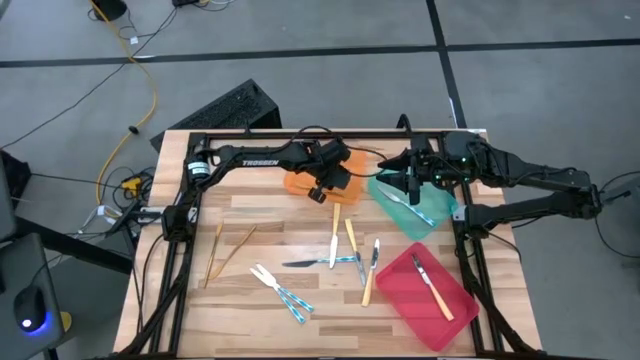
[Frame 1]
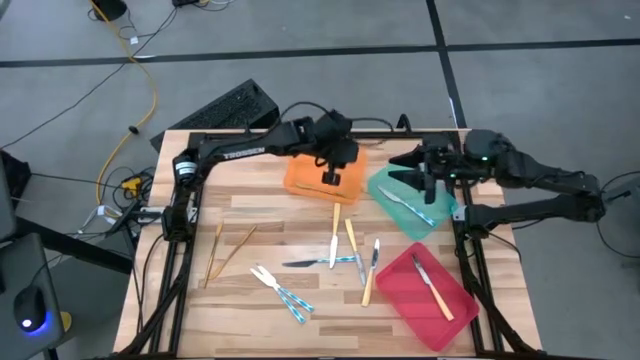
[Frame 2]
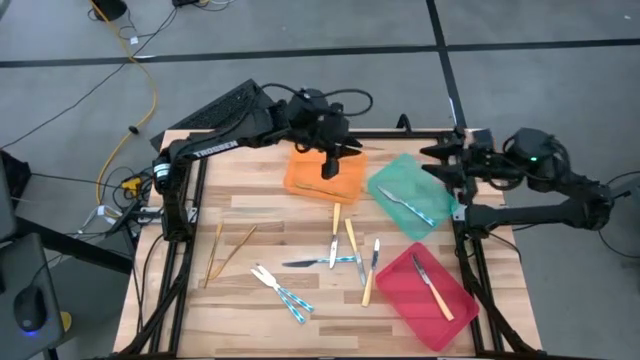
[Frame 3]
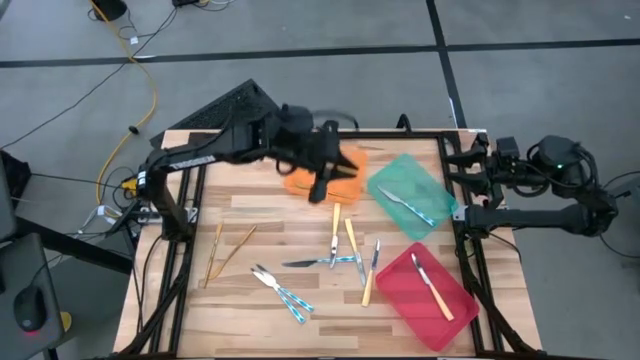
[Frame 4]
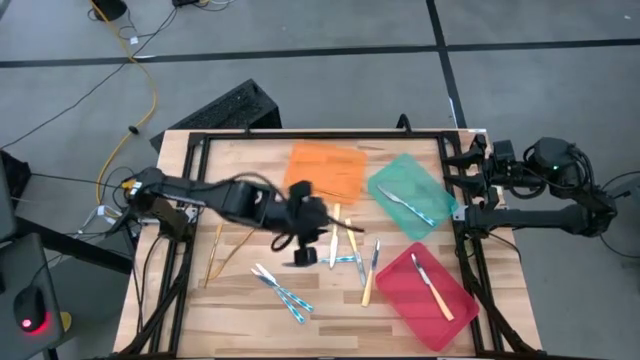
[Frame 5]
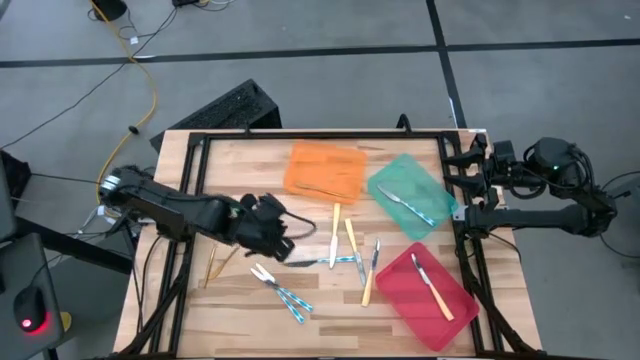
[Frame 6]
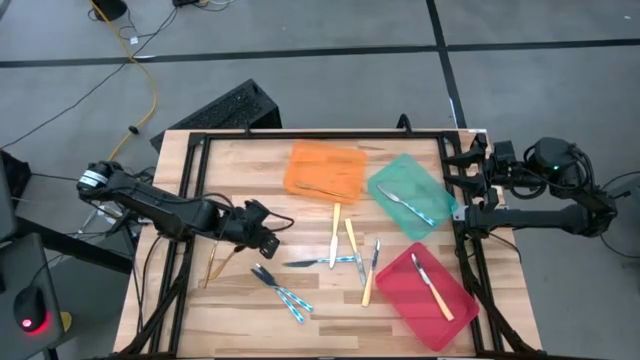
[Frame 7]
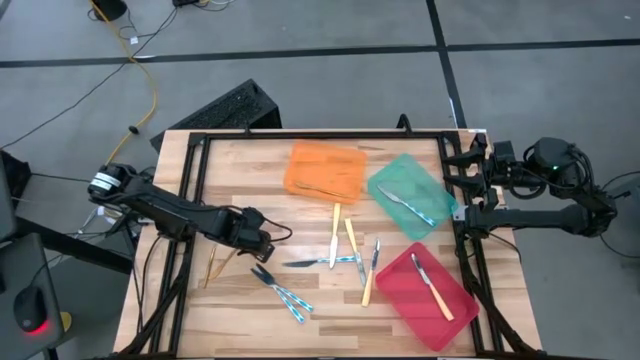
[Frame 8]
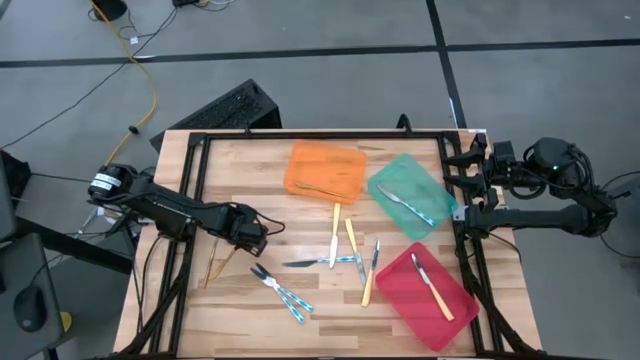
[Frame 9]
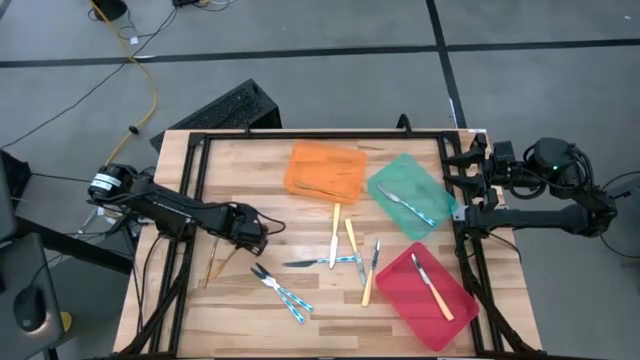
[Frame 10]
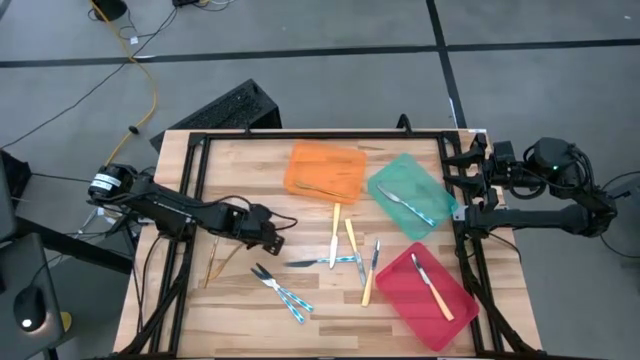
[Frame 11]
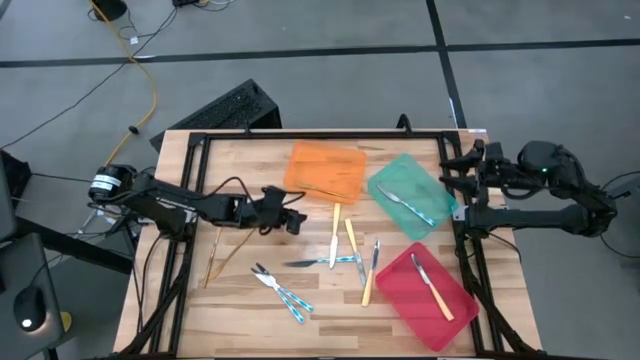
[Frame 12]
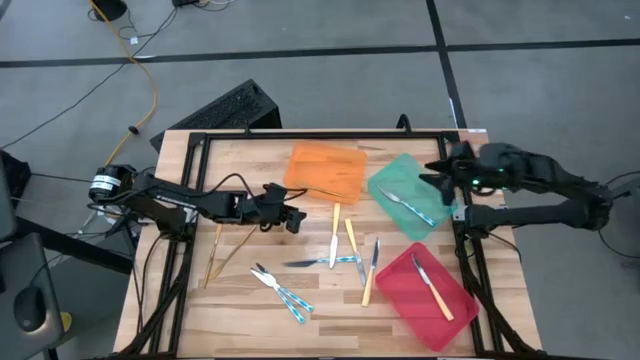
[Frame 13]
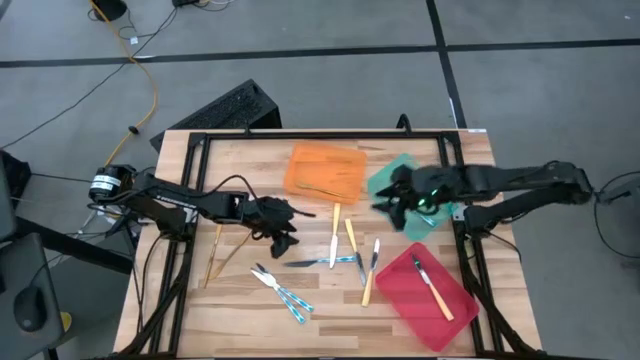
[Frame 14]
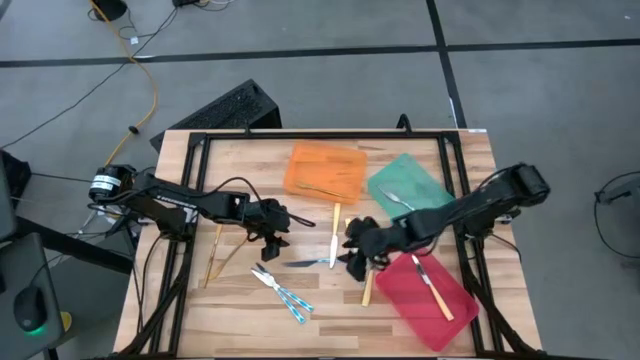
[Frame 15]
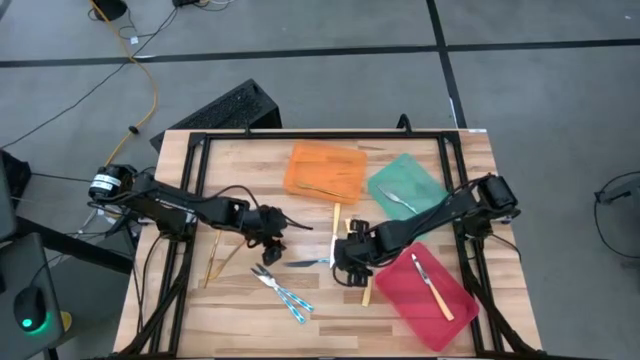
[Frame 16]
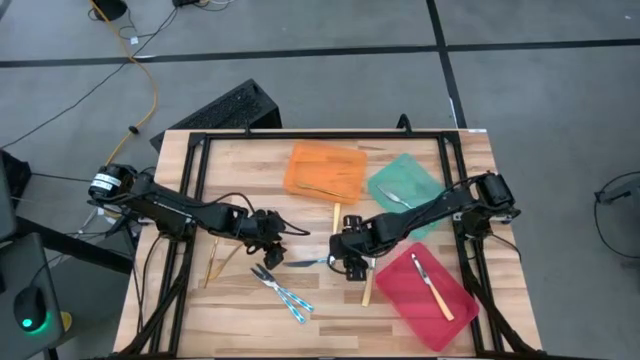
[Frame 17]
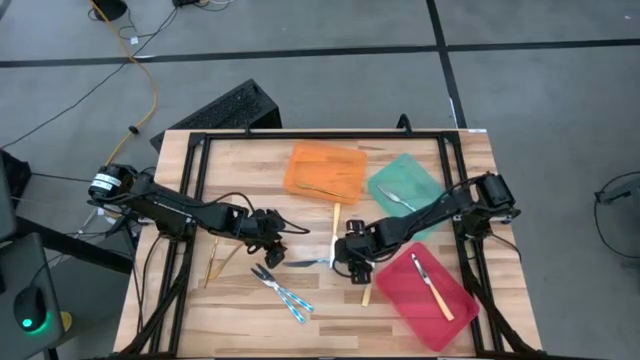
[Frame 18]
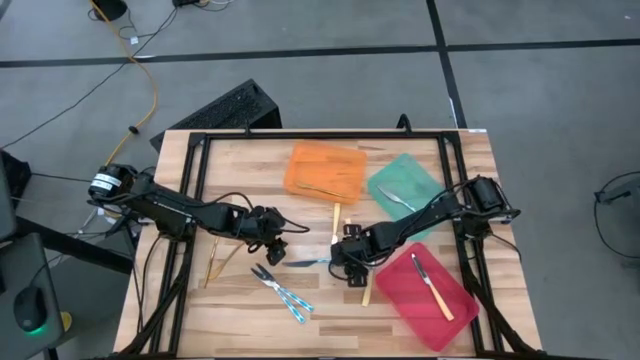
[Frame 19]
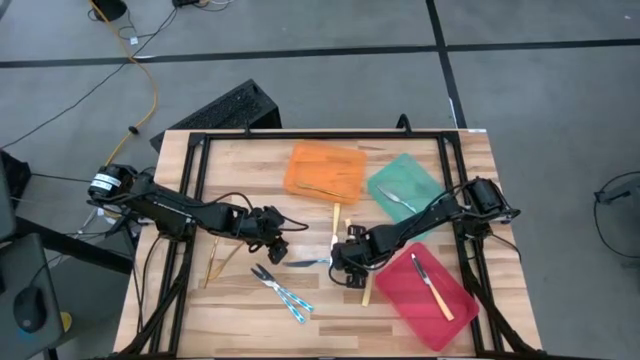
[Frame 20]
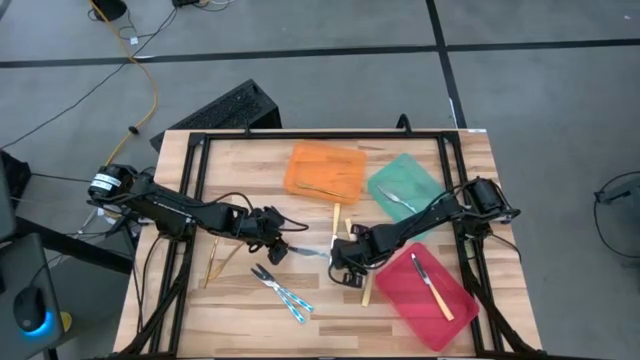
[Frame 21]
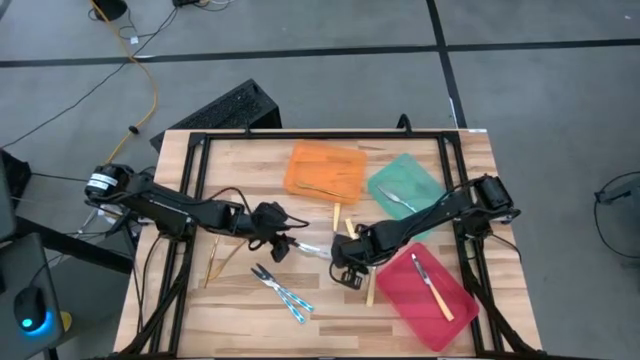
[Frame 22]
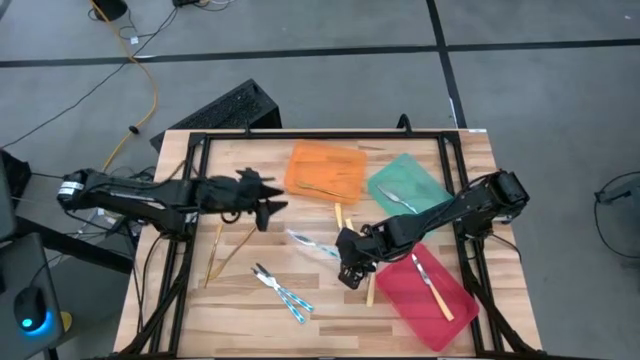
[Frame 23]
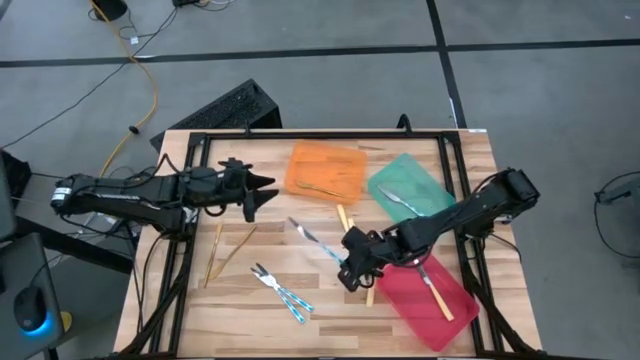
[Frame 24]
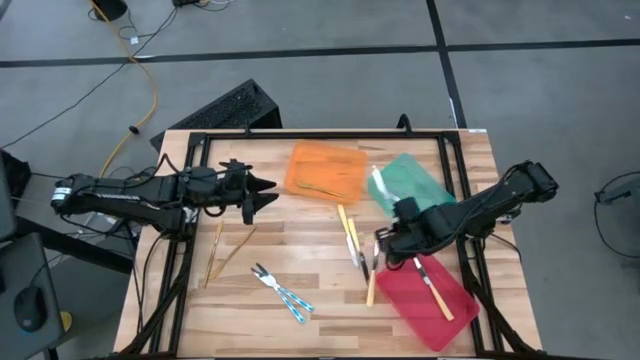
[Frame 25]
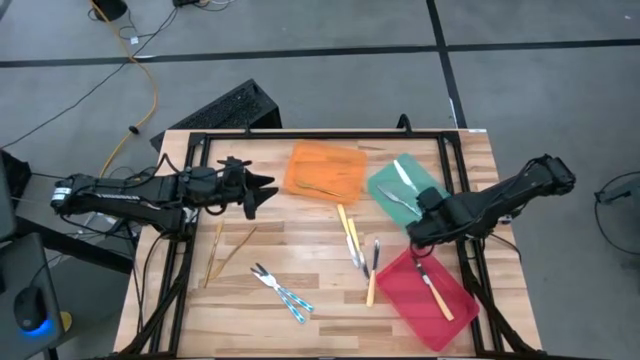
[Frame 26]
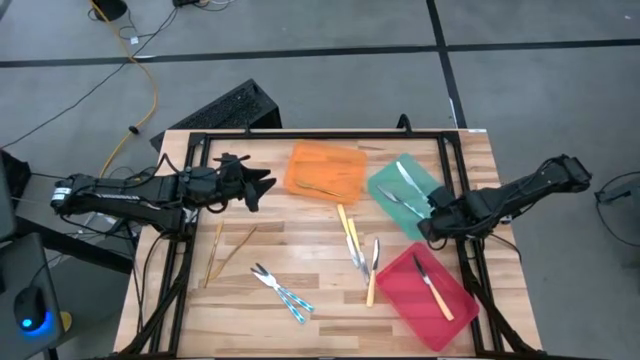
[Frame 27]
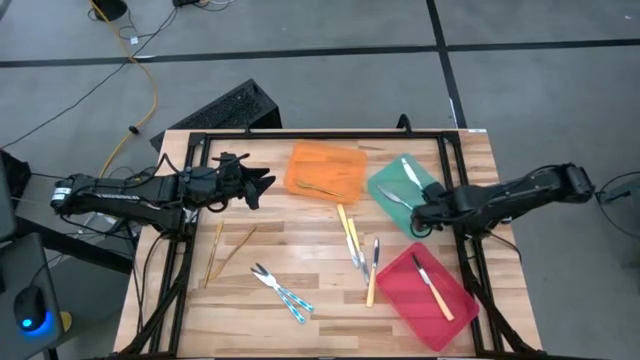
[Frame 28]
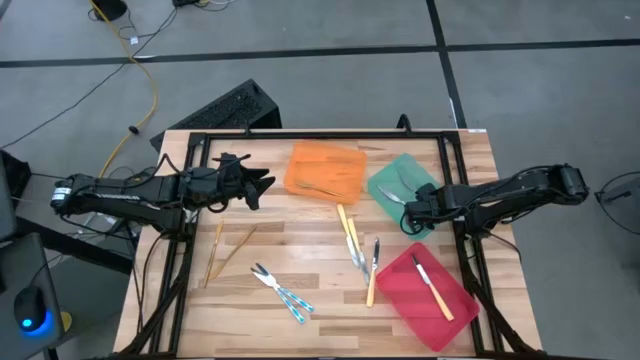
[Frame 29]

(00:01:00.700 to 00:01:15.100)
Task: Sort silverware by color (type)
Put the top white patterned knife into the blue bin

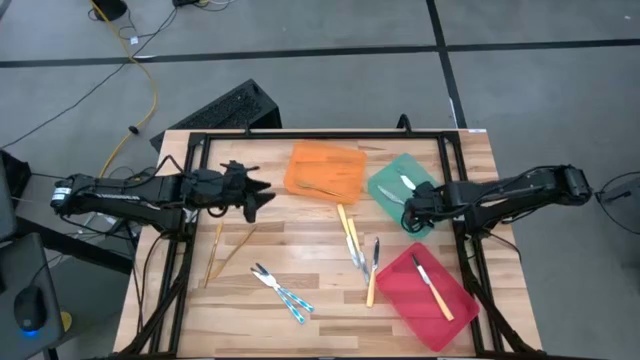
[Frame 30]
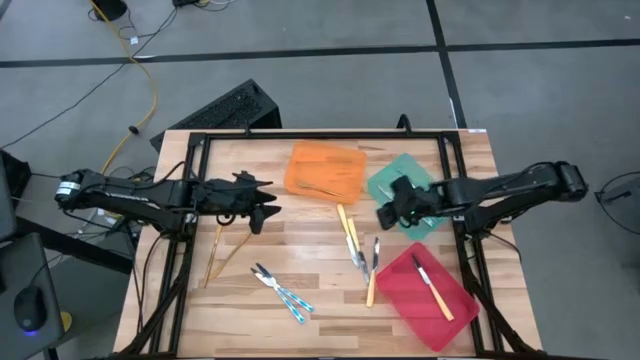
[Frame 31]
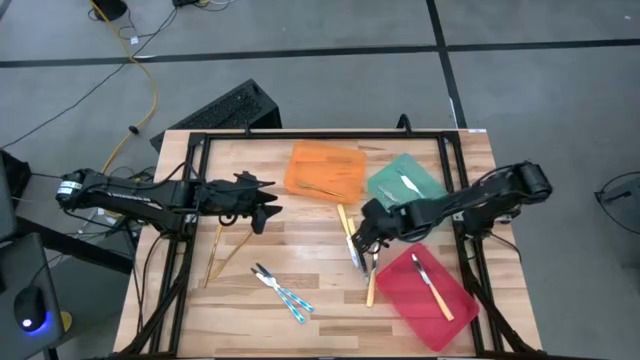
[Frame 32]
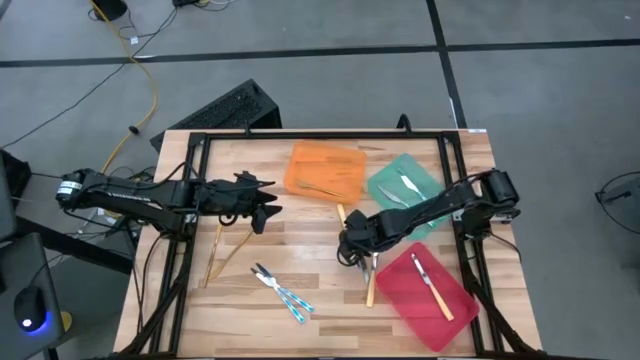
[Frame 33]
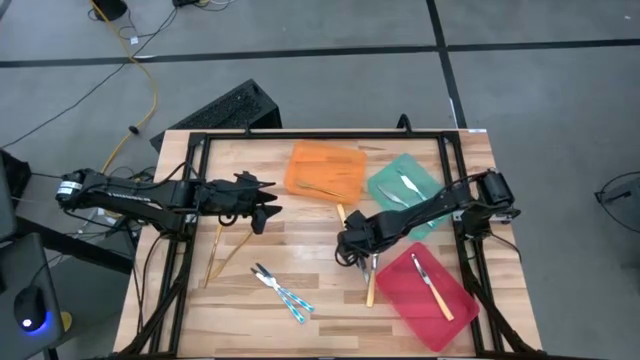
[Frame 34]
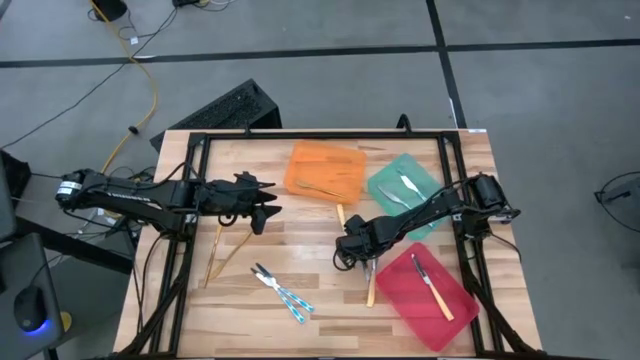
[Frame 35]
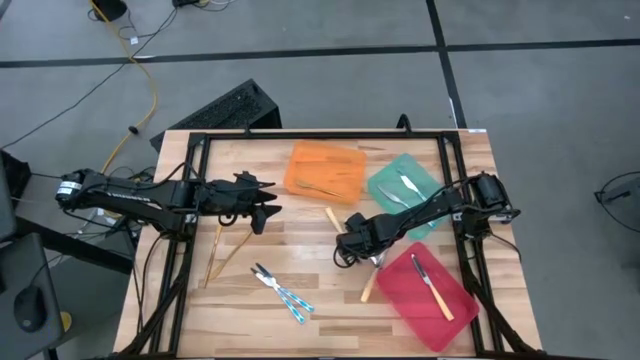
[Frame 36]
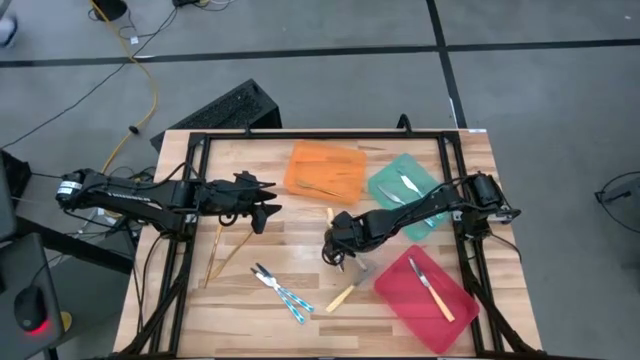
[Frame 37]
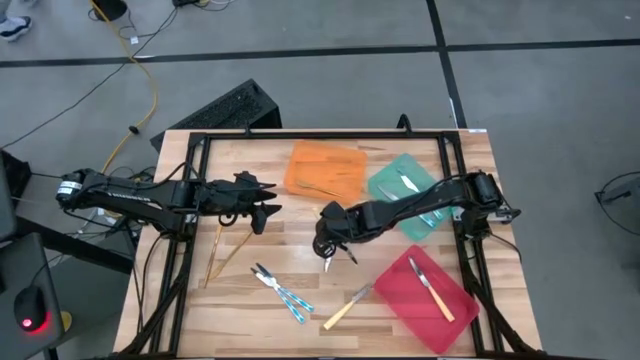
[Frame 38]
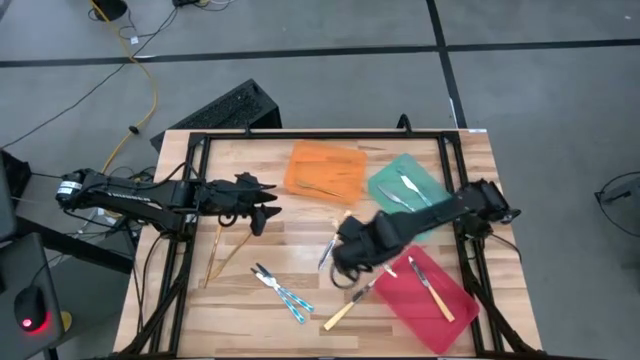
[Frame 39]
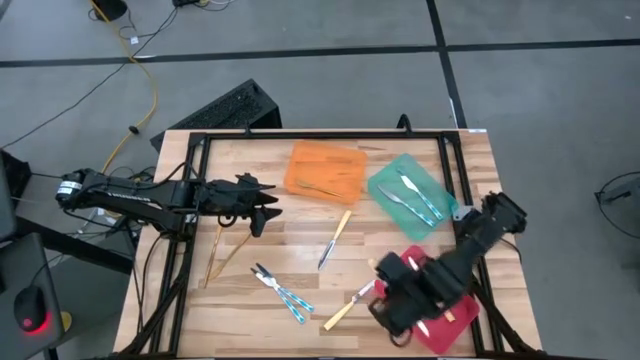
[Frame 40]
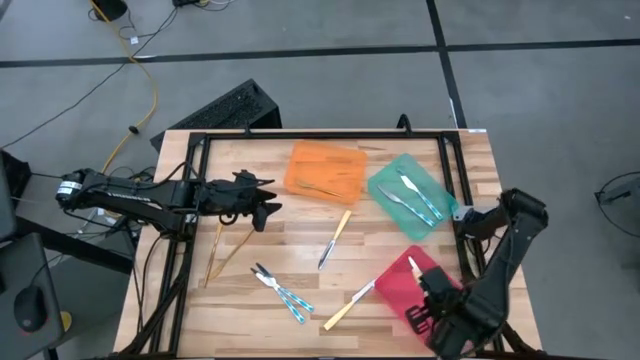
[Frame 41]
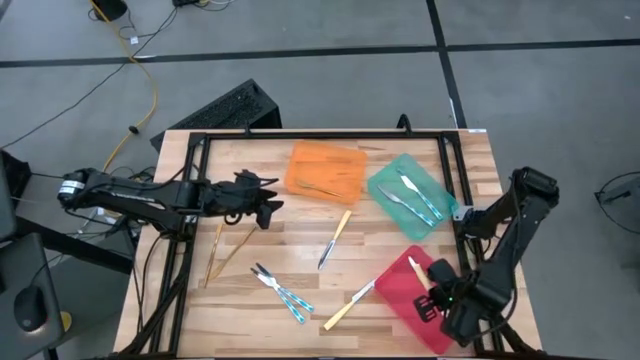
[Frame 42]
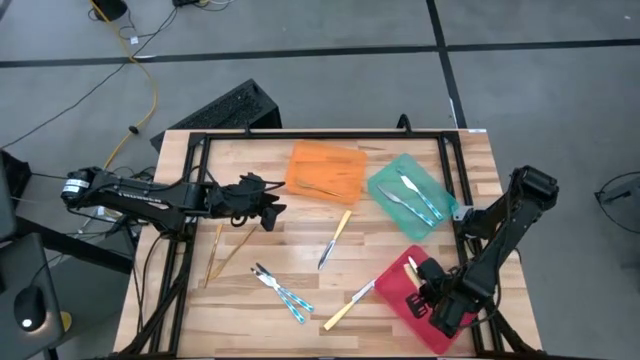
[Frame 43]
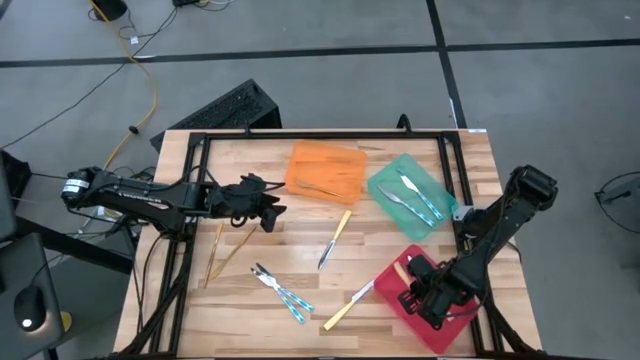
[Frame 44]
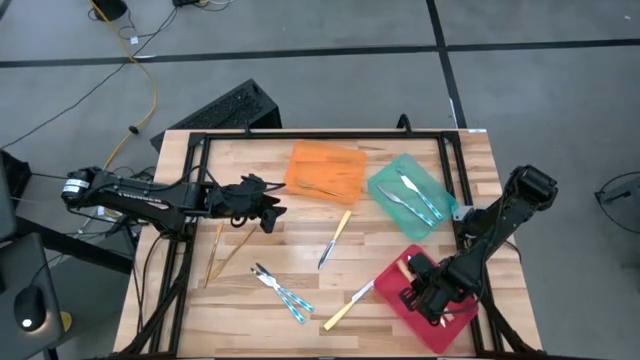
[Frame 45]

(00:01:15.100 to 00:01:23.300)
Put the middle yellow knife into the red bin
